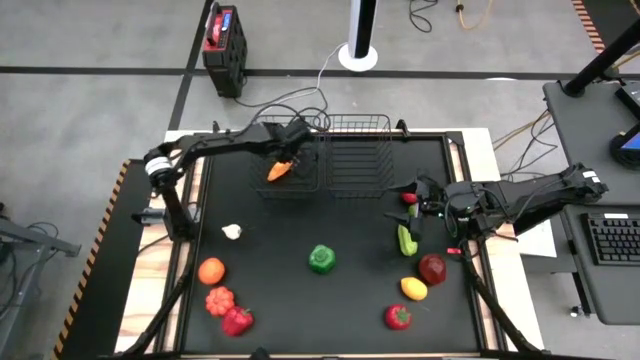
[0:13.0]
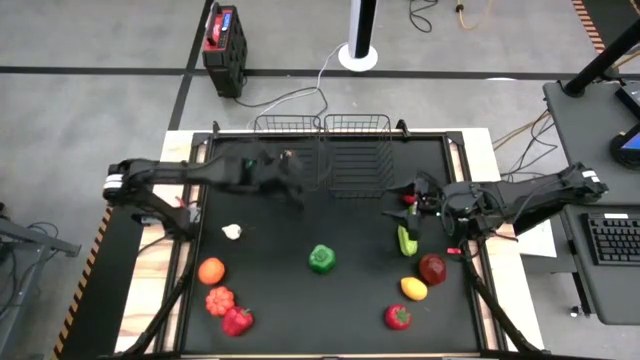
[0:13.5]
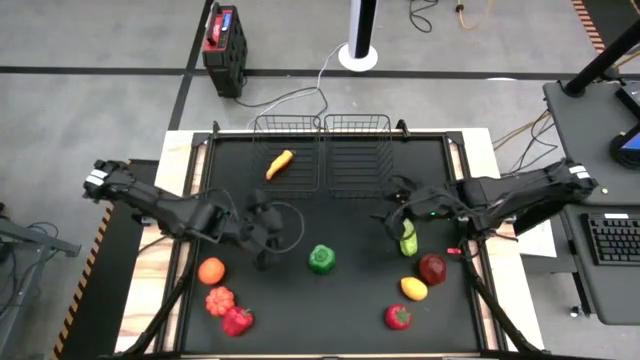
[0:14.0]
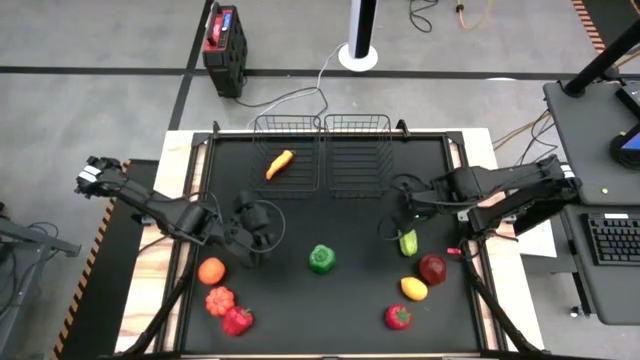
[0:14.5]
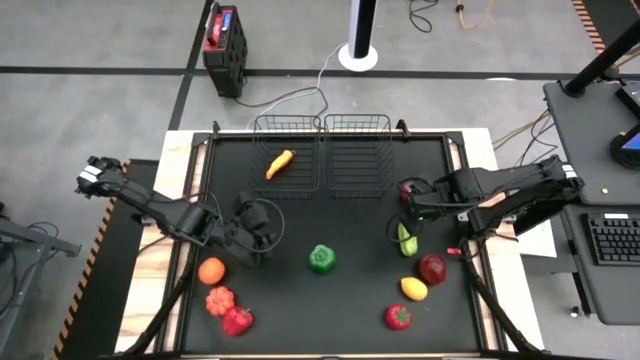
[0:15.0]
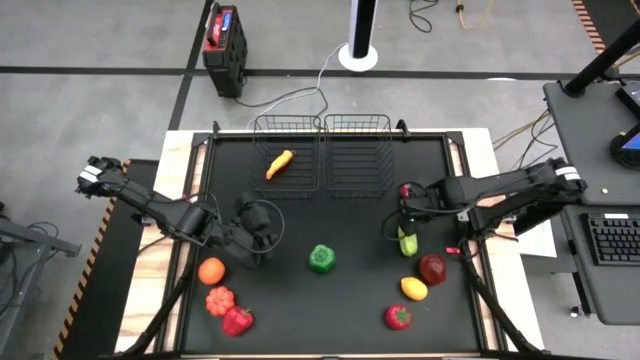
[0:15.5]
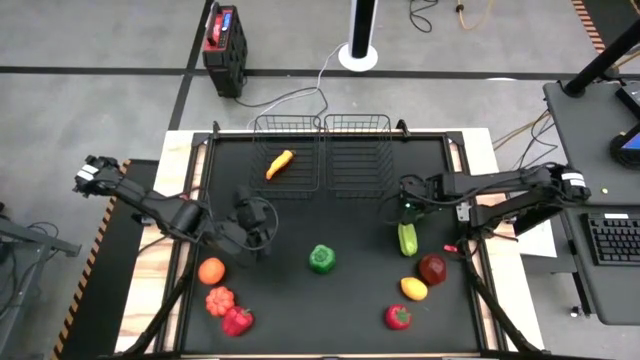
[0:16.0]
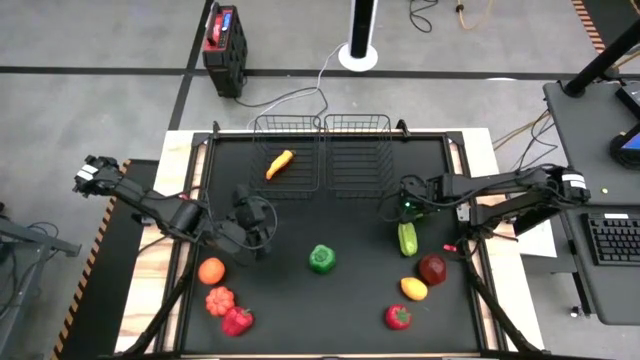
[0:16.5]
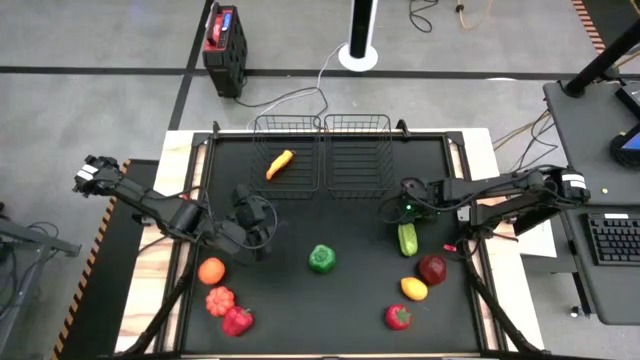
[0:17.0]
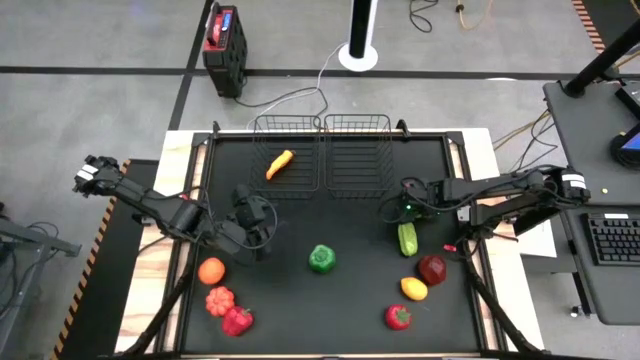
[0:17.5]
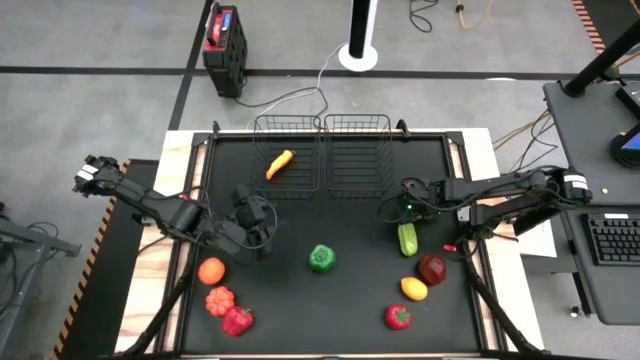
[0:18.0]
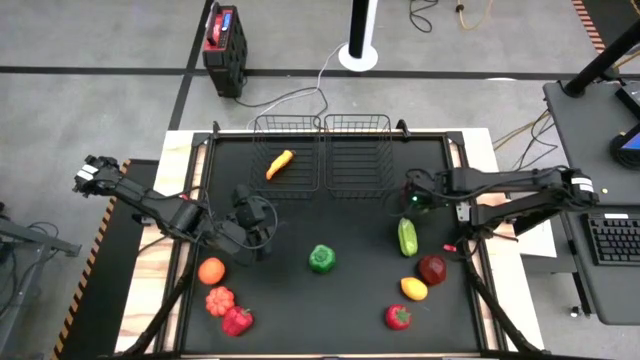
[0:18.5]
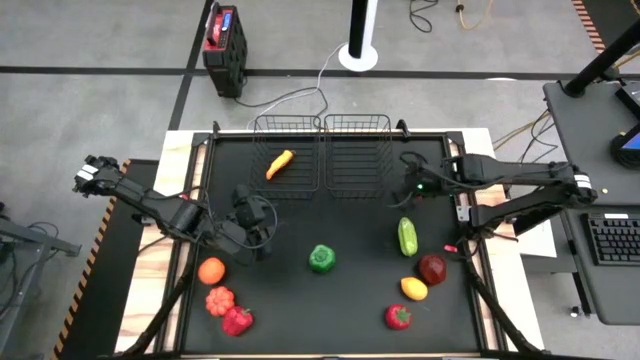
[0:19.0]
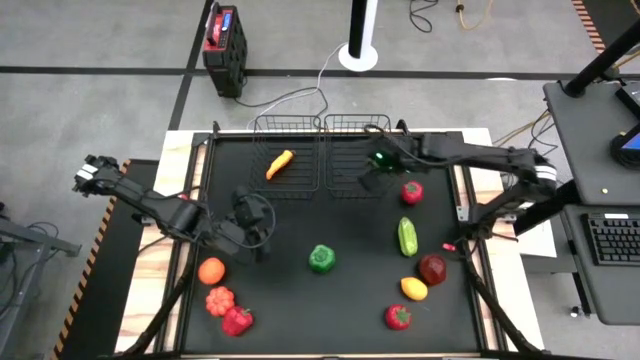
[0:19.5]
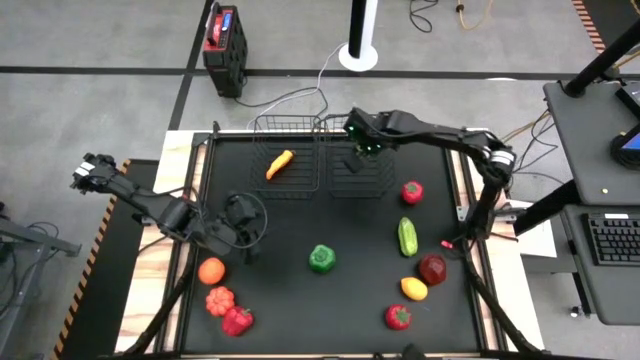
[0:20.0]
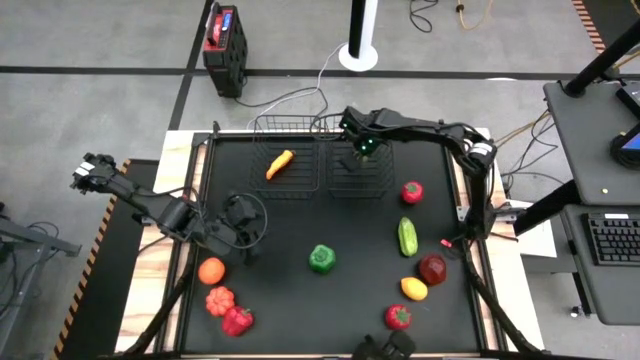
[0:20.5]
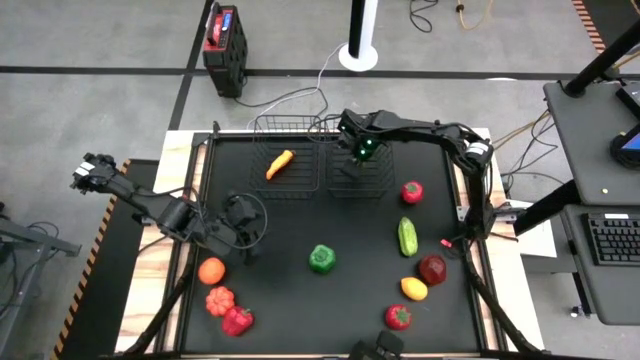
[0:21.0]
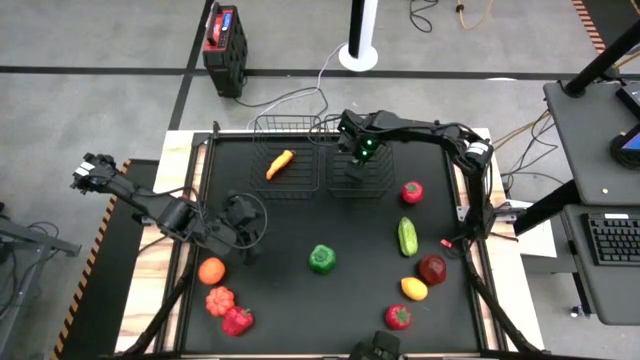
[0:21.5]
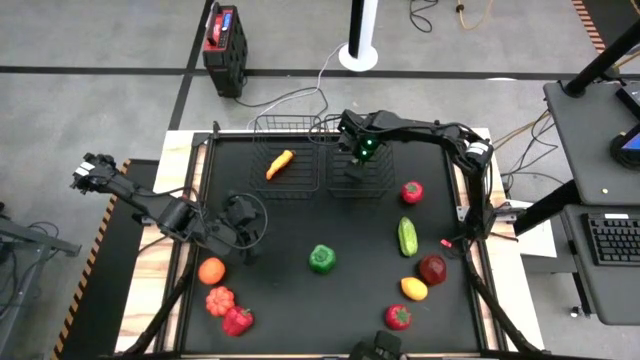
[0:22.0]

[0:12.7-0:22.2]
Task: Sort produce into baskets
Put the lime into the right wire basket

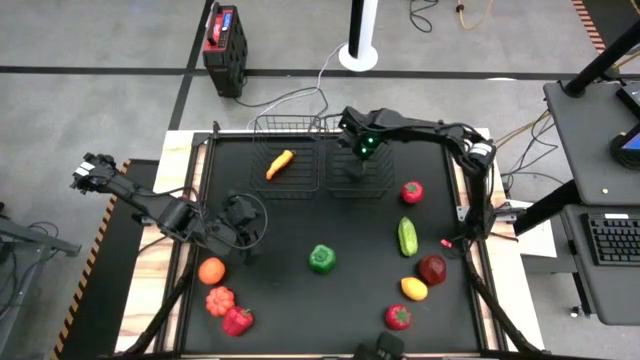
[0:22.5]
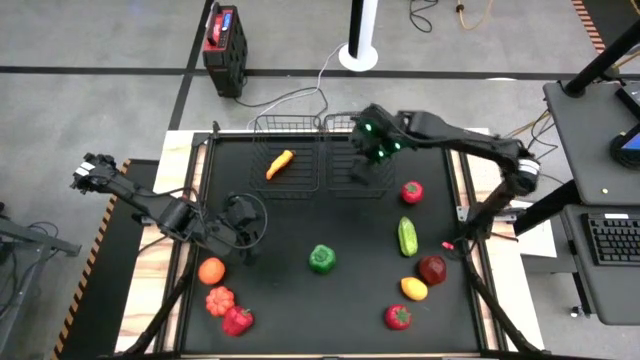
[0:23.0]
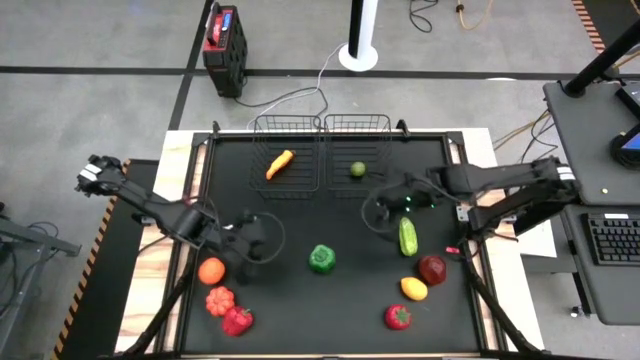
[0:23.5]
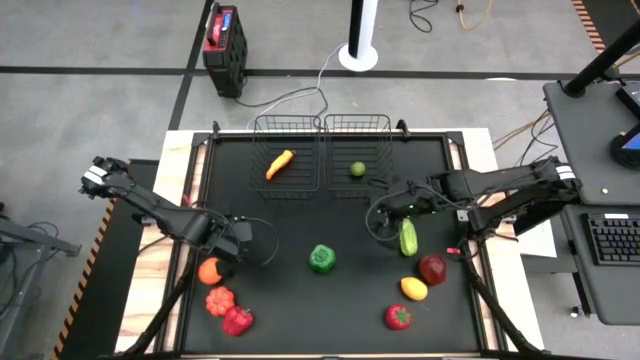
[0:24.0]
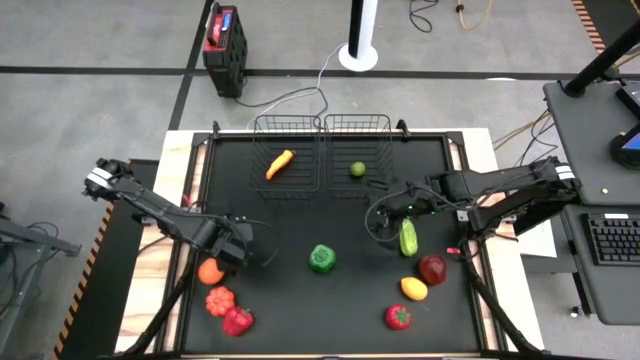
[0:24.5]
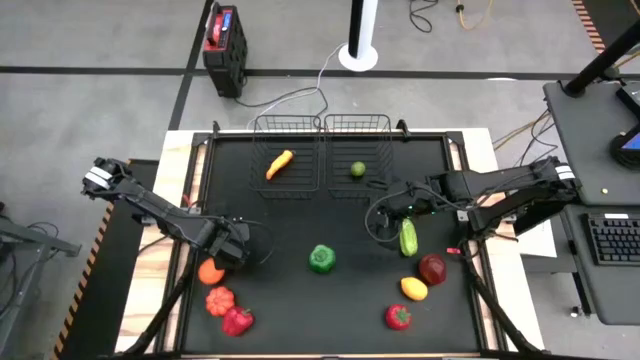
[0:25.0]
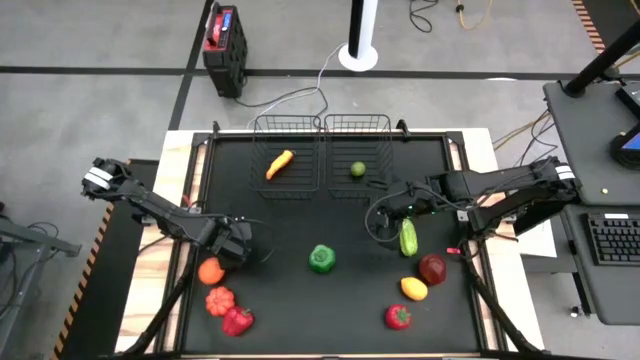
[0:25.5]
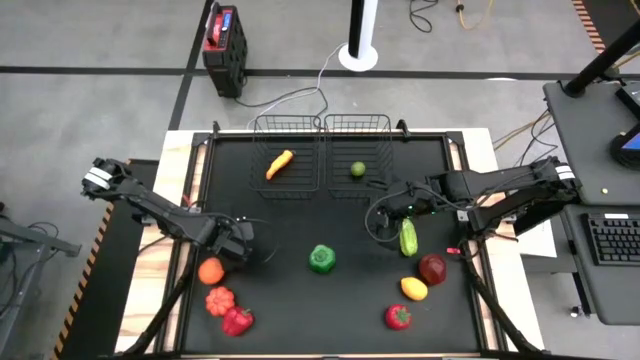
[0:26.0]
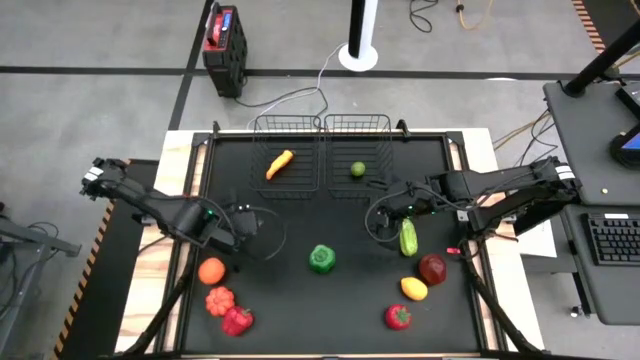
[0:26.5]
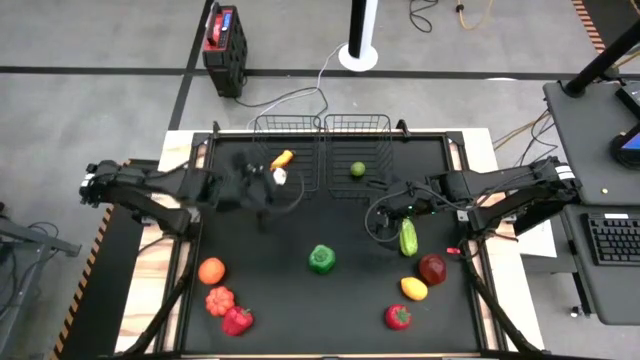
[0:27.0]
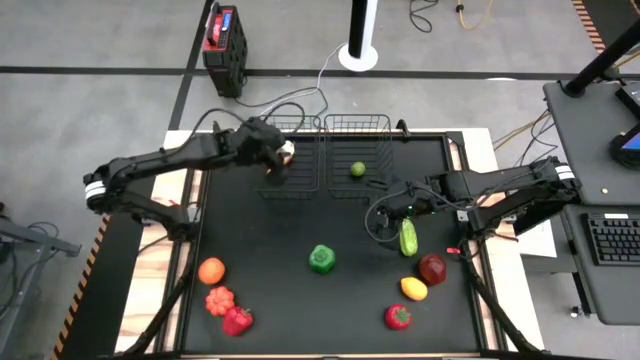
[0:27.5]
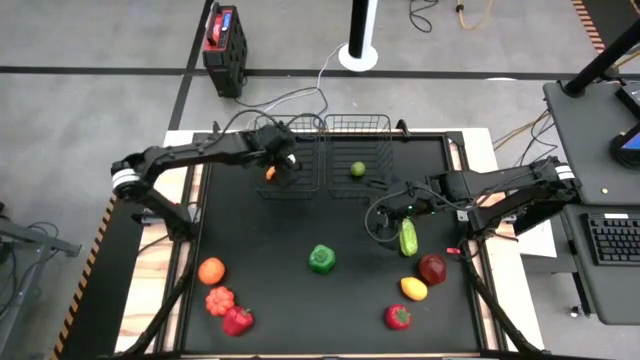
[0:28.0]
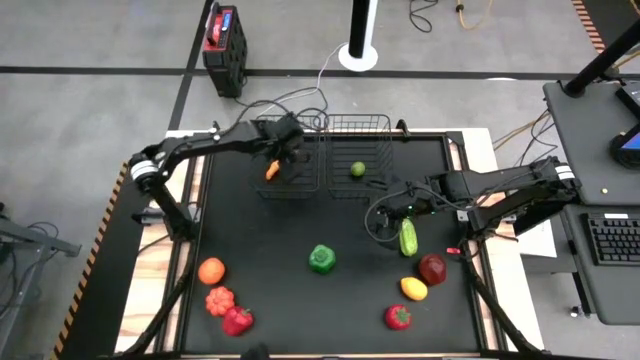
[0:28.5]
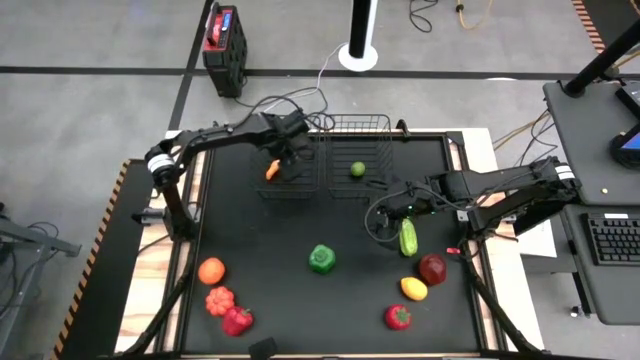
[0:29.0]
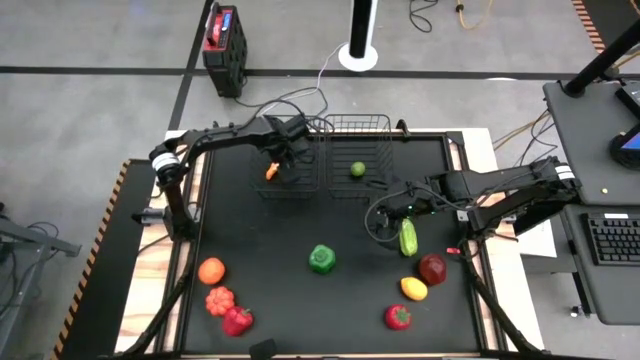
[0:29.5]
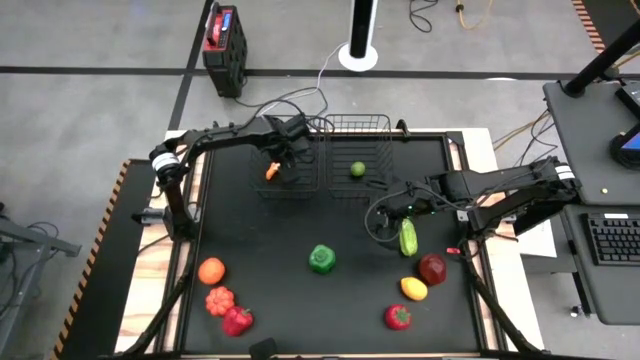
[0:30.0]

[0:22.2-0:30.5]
Put the white garlic into the left wire basket

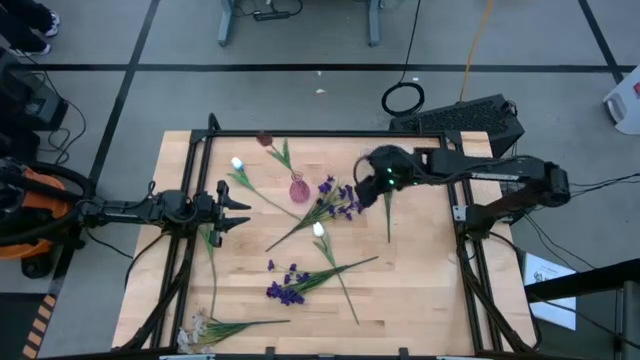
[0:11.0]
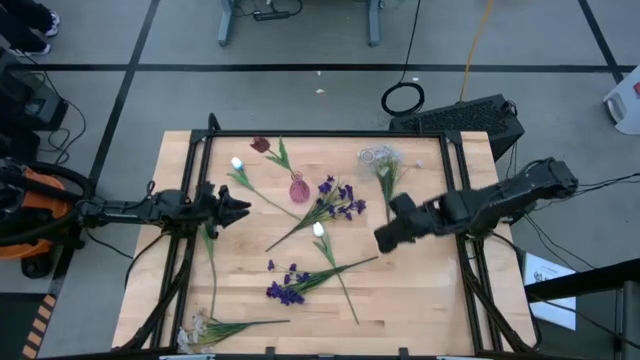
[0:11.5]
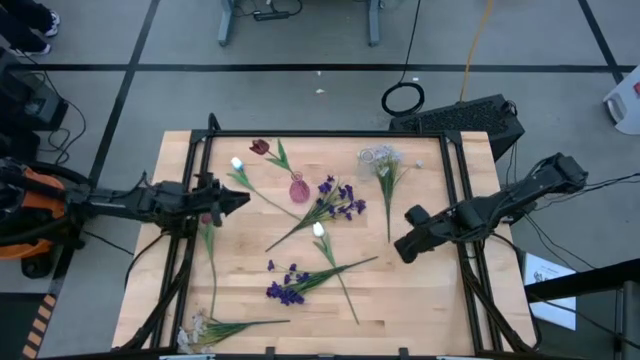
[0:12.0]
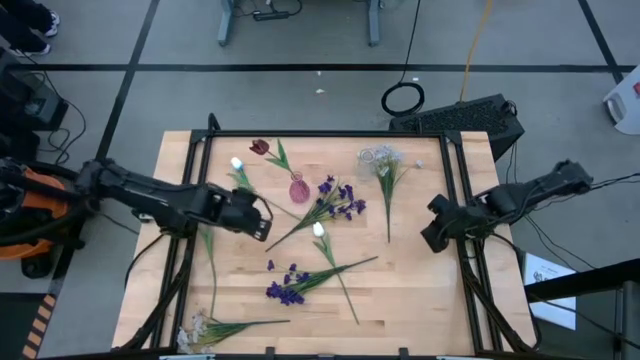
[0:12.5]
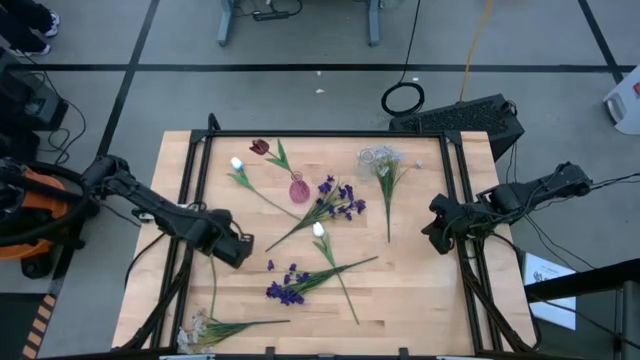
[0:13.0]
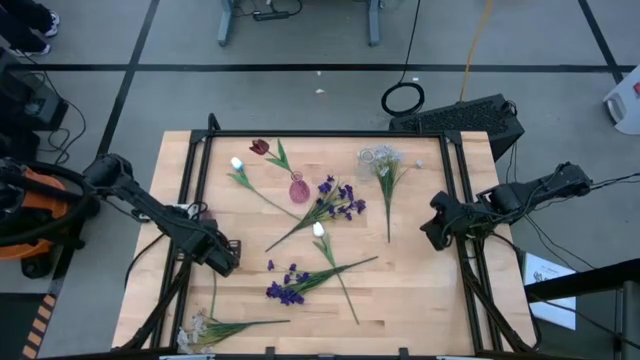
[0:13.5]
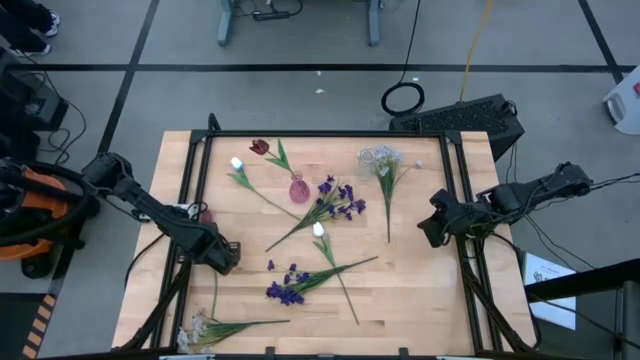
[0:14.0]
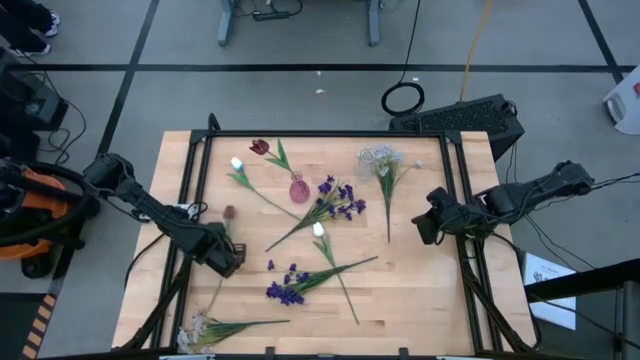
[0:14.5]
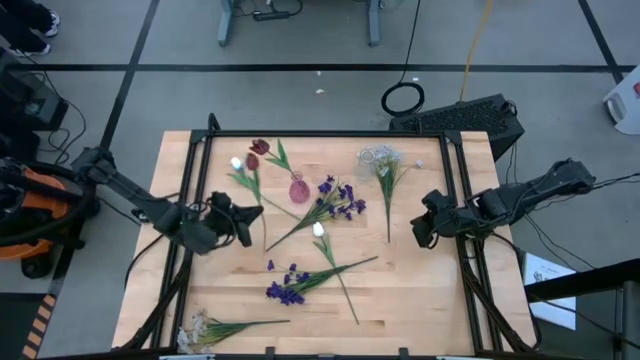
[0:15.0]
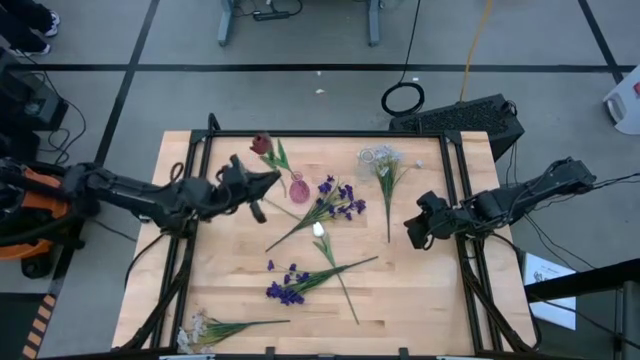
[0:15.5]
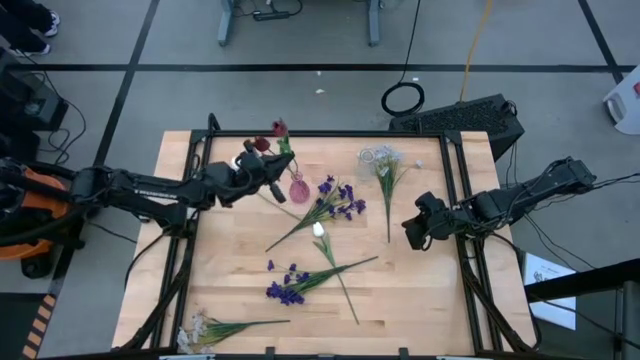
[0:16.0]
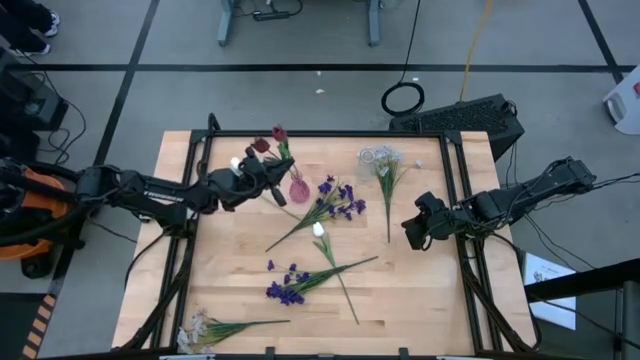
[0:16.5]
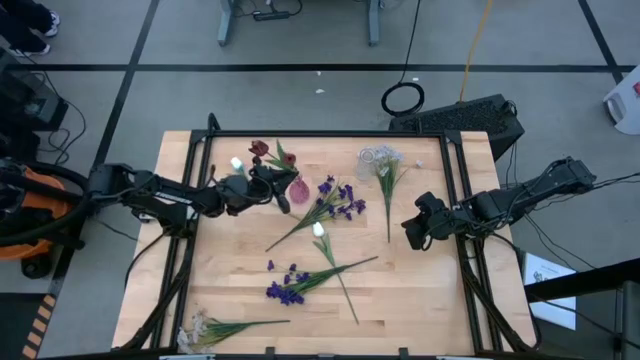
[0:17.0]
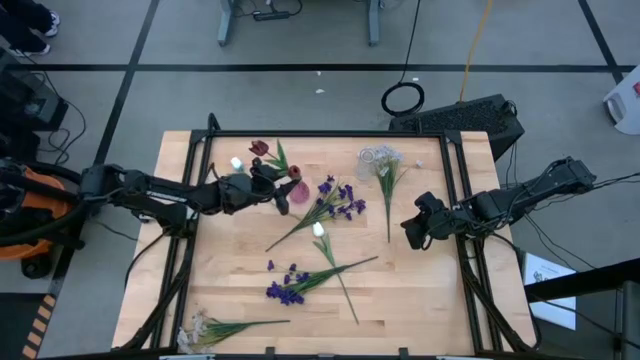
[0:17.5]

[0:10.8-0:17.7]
Task: Sort flowers into vase by color
Put the red flower into the transparent purple vase
